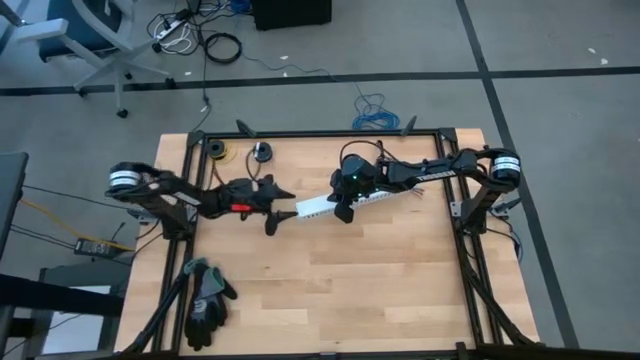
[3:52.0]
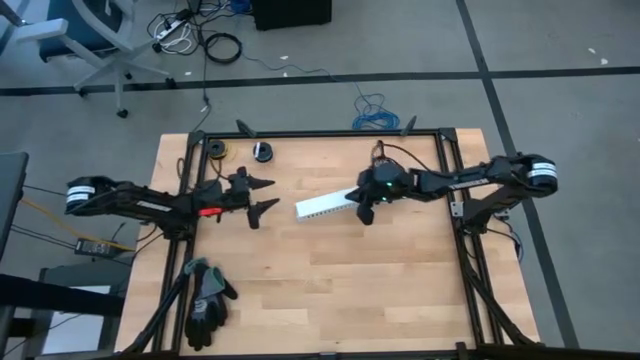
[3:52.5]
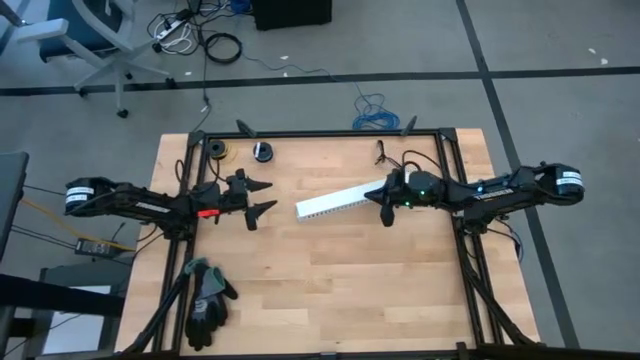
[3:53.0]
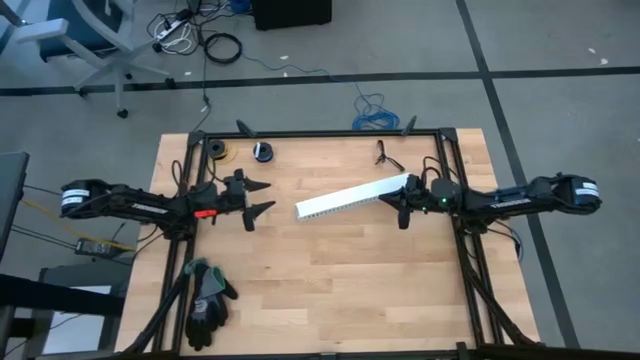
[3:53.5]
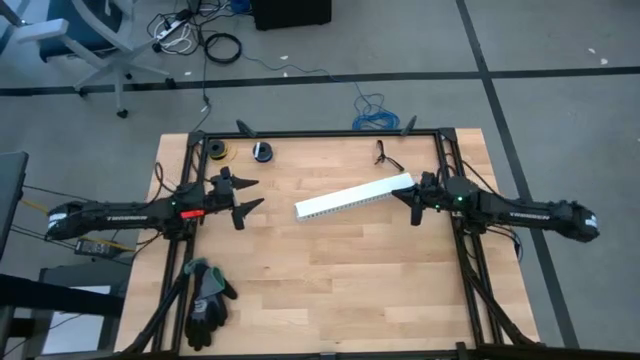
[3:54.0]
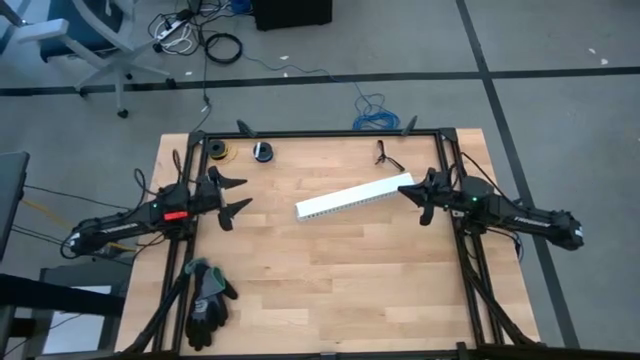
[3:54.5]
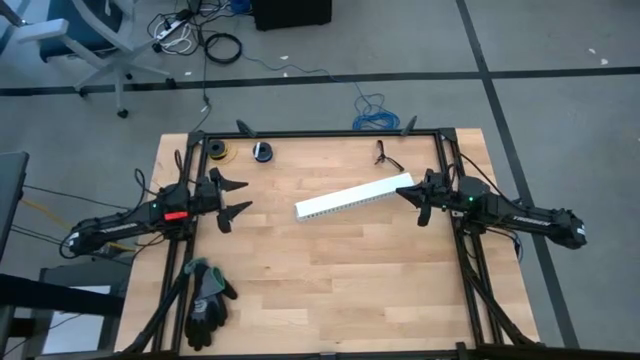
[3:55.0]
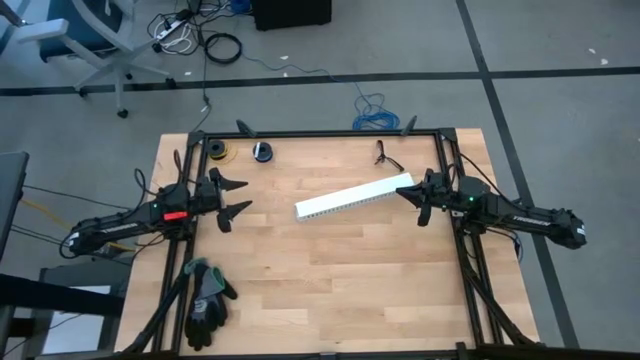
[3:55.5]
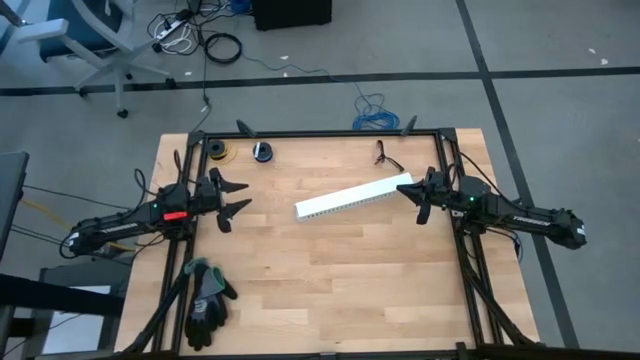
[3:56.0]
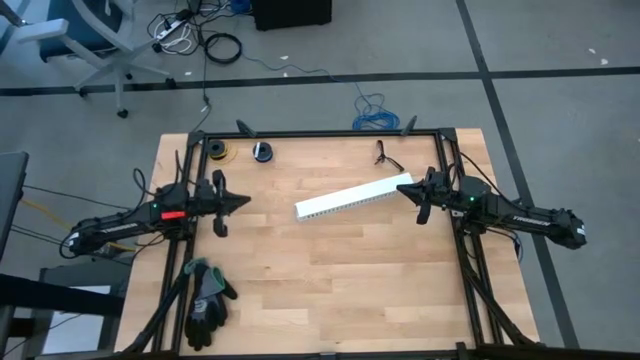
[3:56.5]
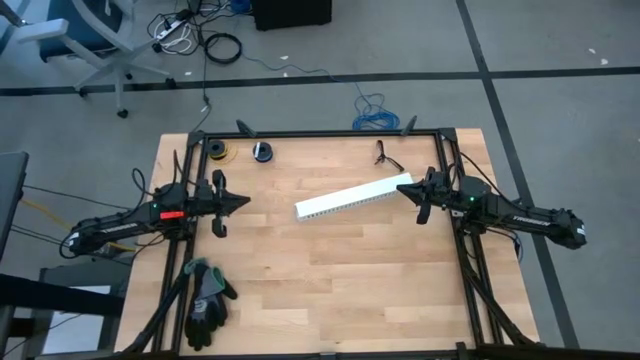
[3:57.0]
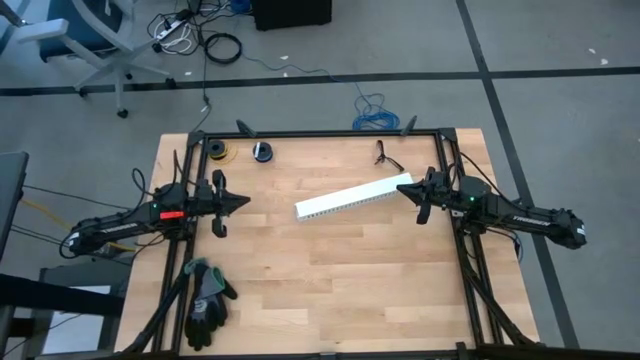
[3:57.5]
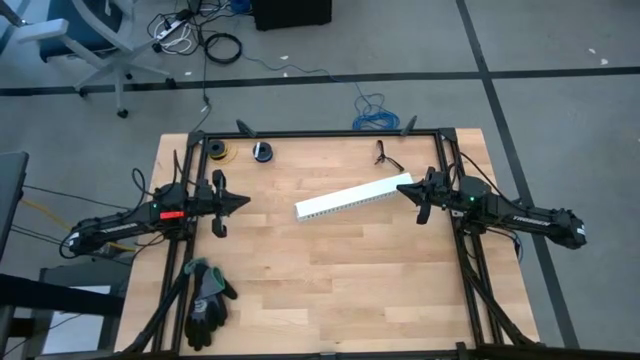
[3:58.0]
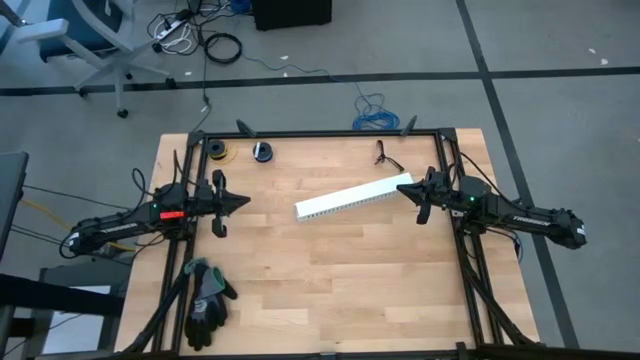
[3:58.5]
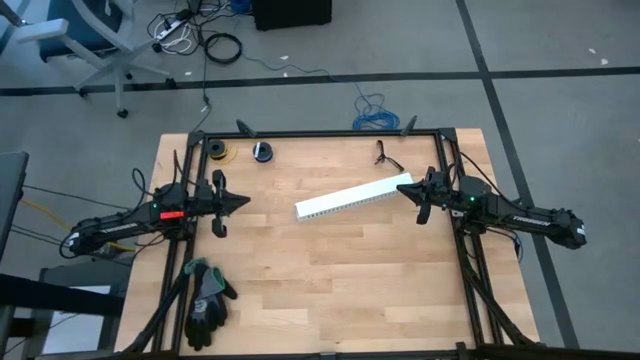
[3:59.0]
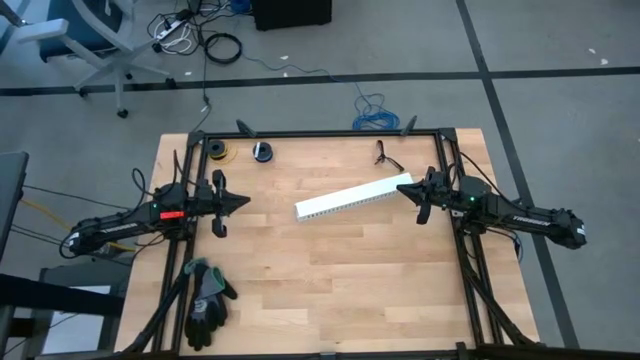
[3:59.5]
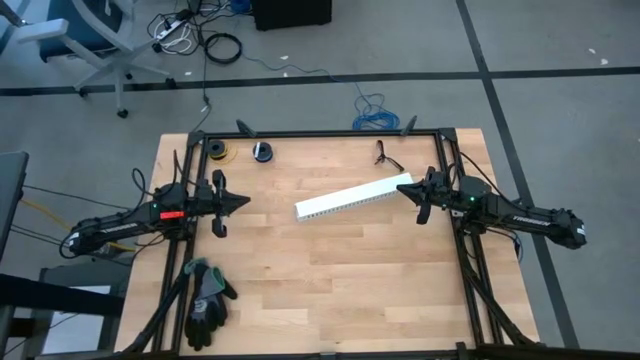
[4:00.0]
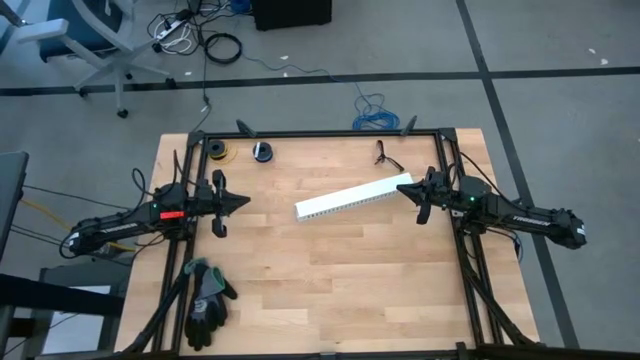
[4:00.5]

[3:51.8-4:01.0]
Task: Ziptie cables
Return to Home Position

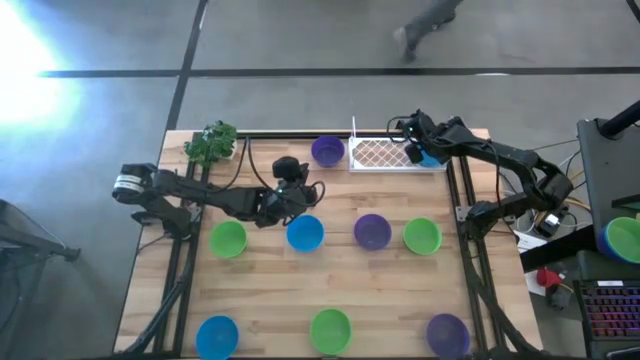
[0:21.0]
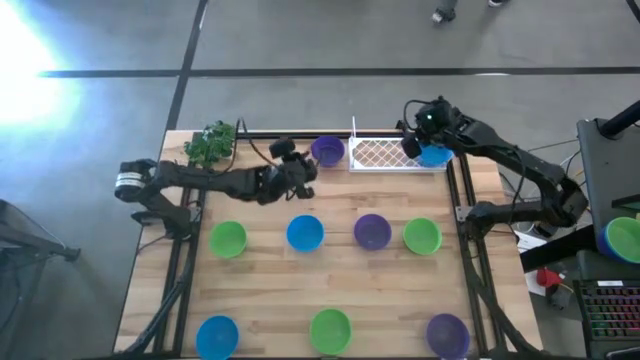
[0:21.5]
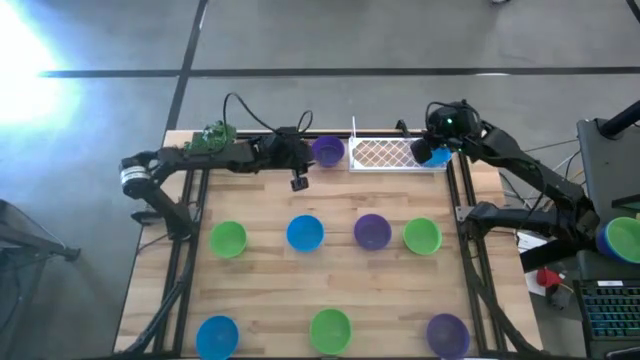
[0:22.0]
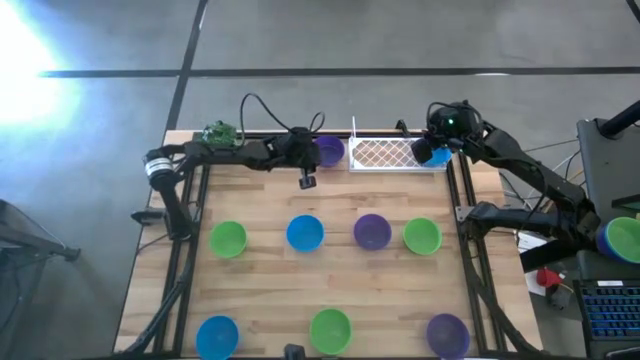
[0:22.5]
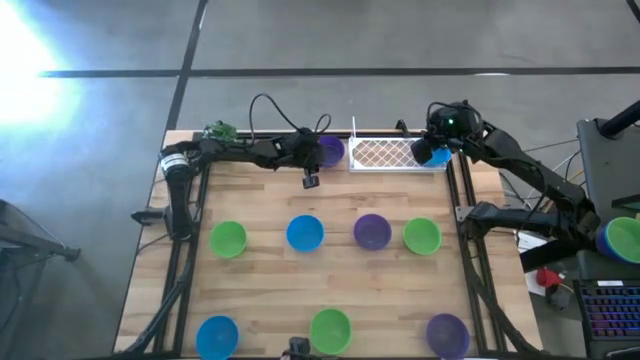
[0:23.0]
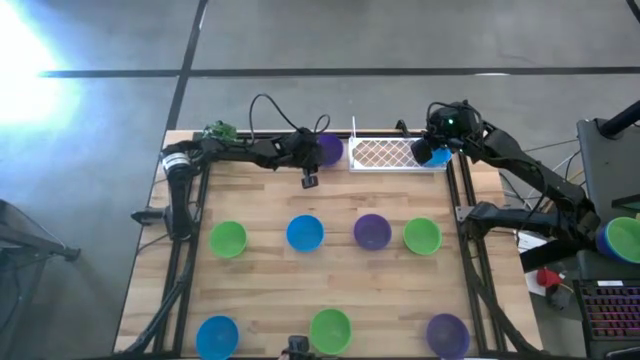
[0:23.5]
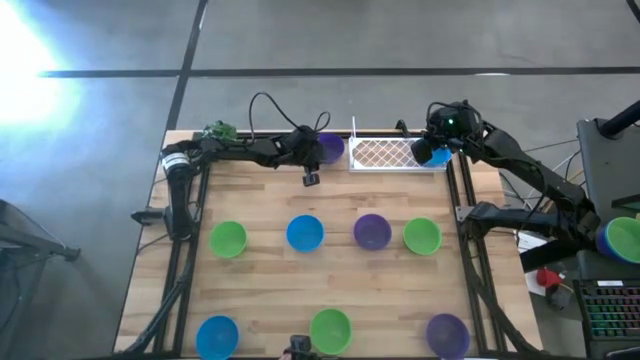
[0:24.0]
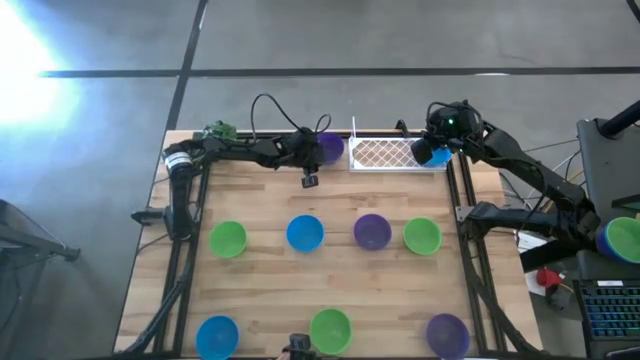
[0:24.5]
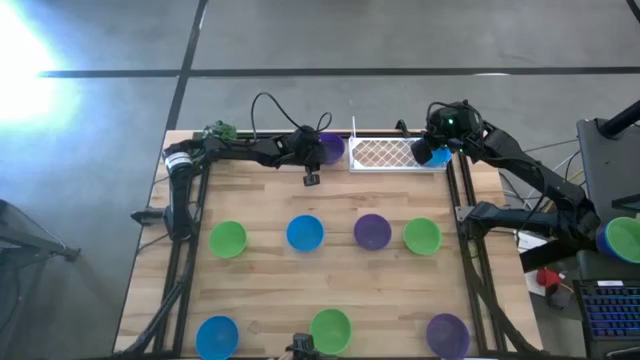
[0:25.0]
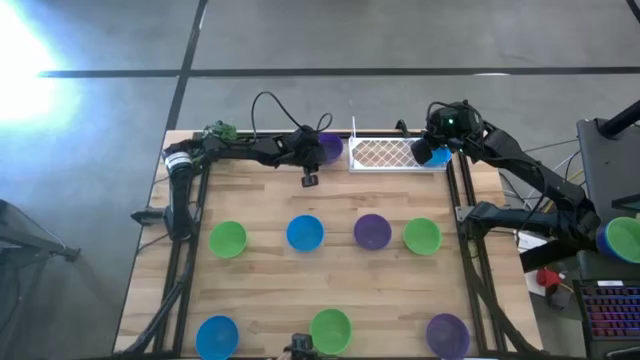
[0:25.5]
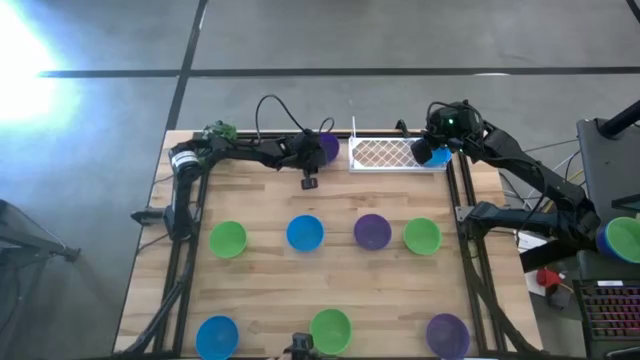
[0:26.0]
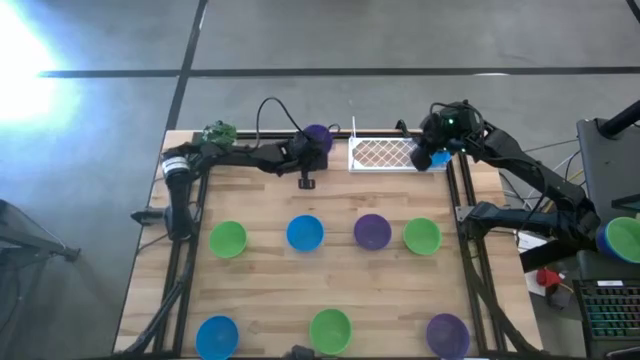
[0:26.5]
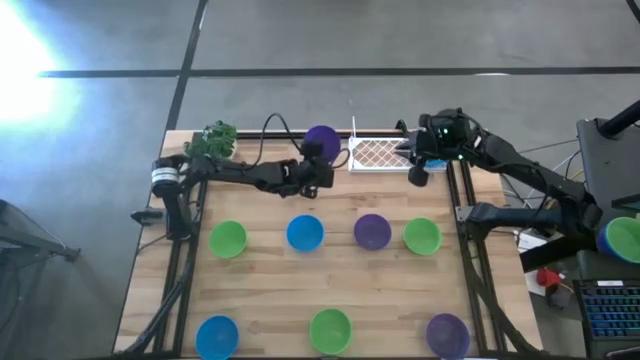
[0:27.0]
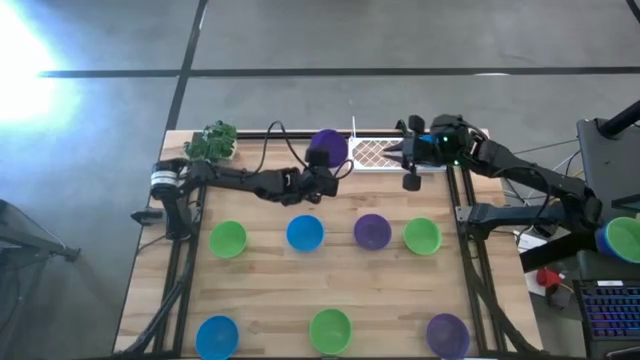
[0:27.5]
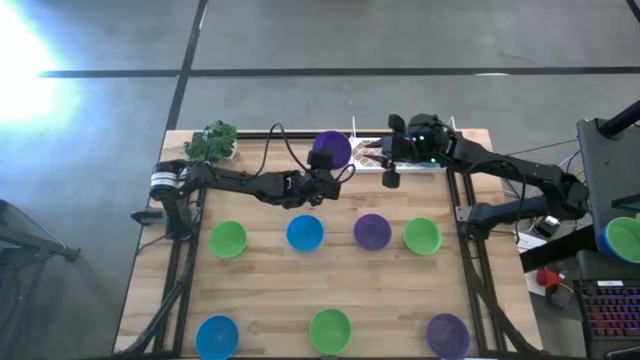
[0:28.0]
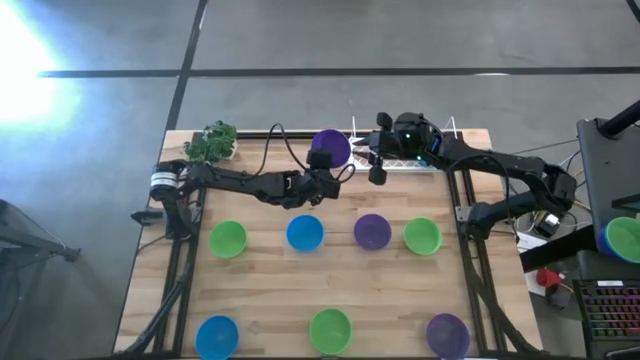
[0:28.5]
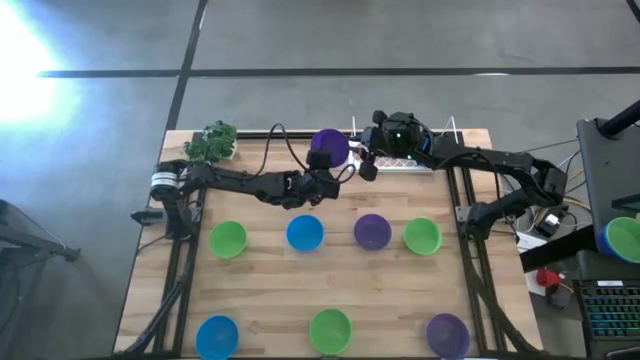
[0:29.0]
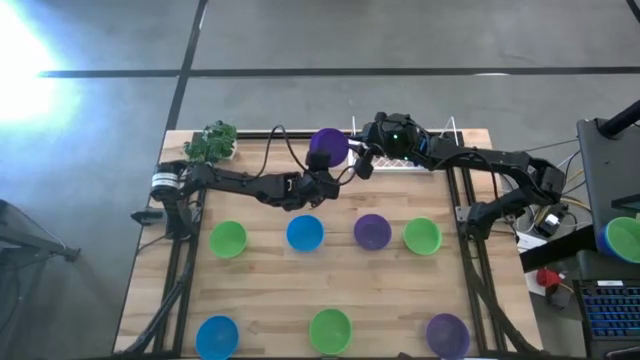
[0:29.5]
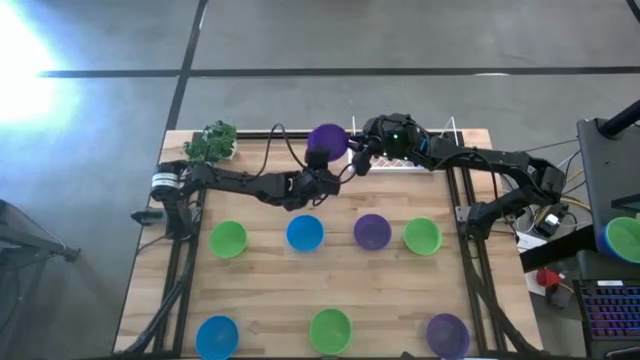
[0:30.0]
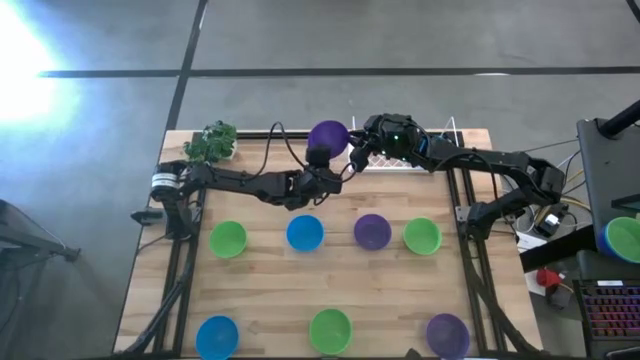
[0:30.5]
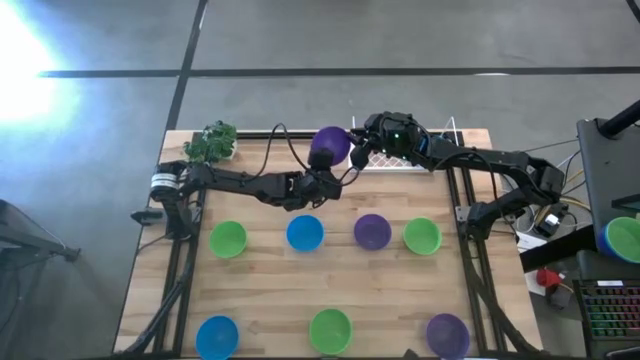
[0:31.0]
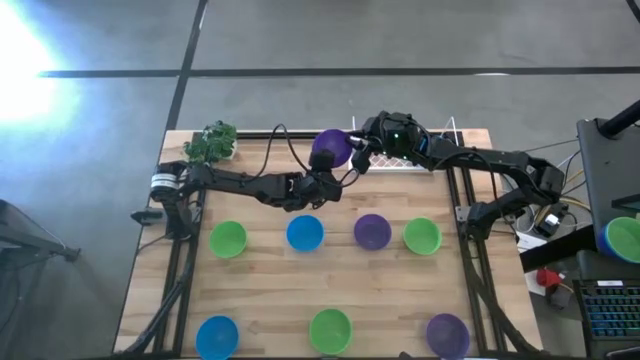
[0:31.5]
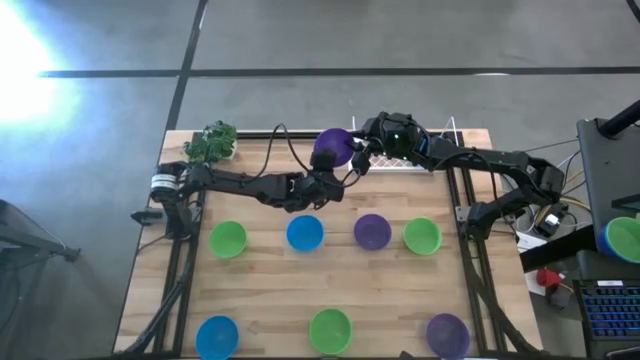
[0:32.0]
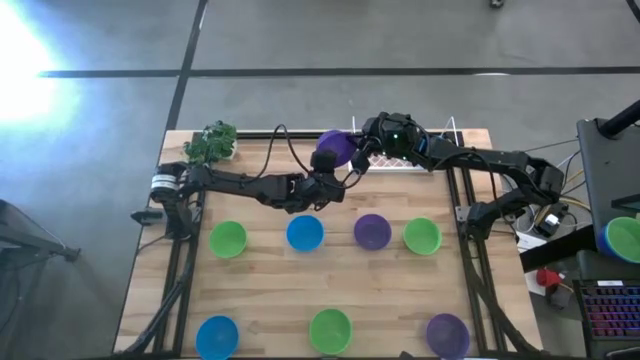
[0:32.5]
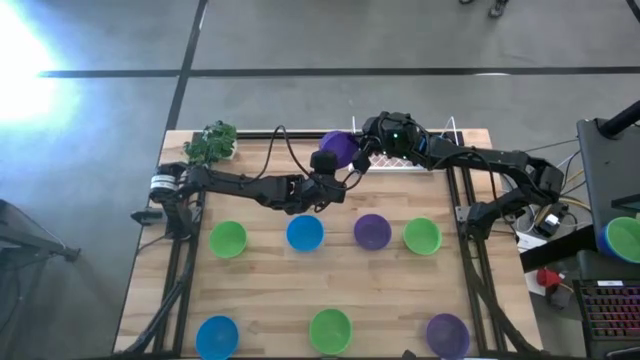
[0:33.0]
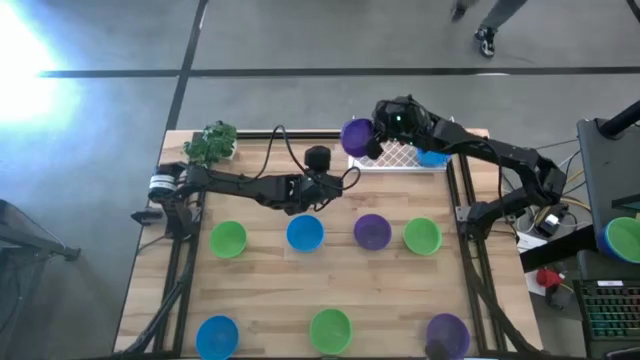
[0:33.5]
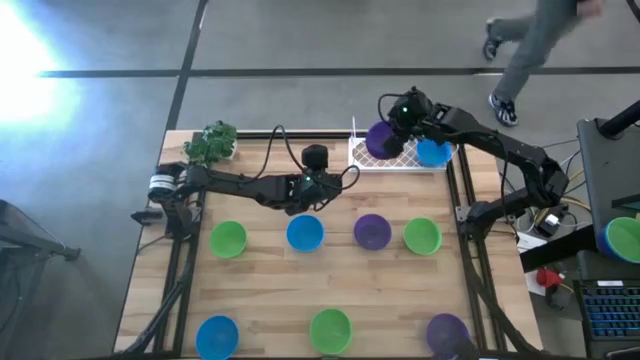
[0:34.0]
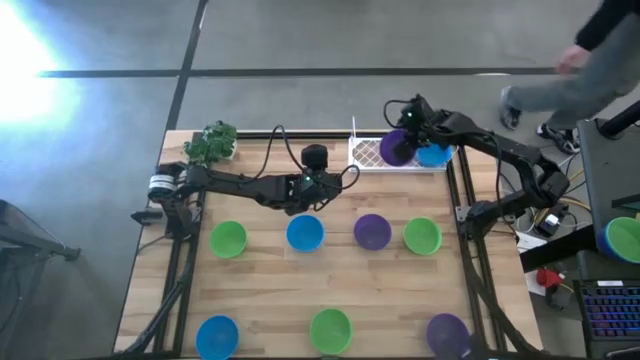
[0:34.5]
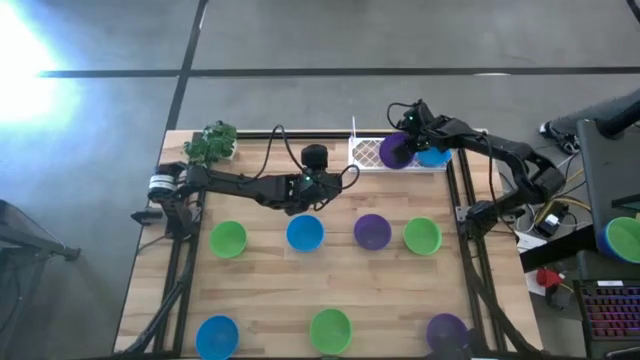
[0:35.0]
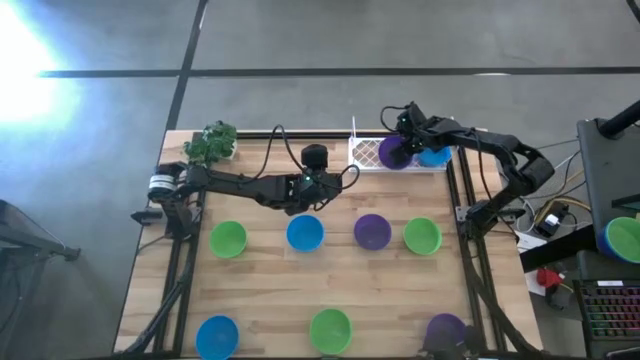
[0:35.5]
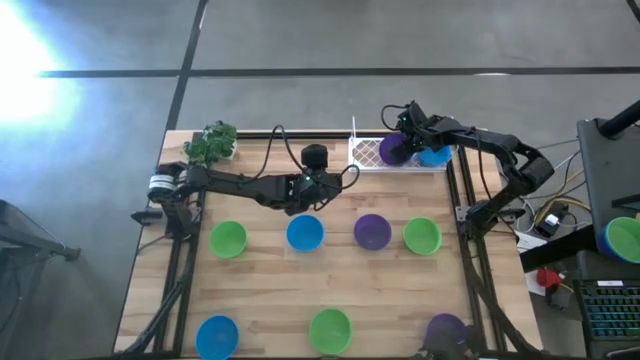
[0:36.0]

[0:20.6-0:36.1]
Task: Pick & Place Mini bowls
Put the top violet bowl on the shelf
